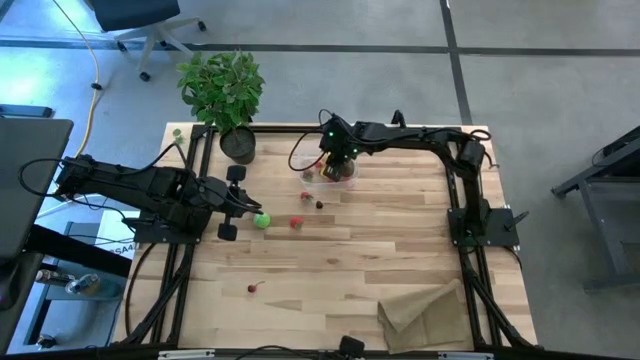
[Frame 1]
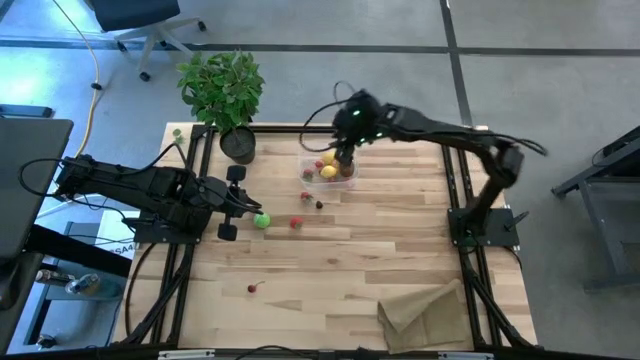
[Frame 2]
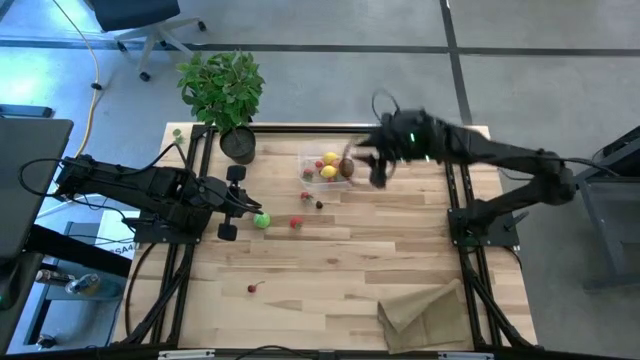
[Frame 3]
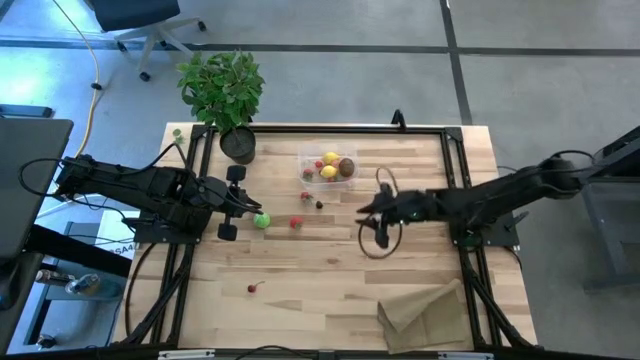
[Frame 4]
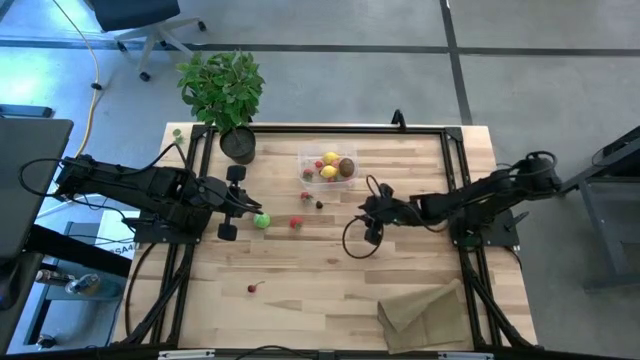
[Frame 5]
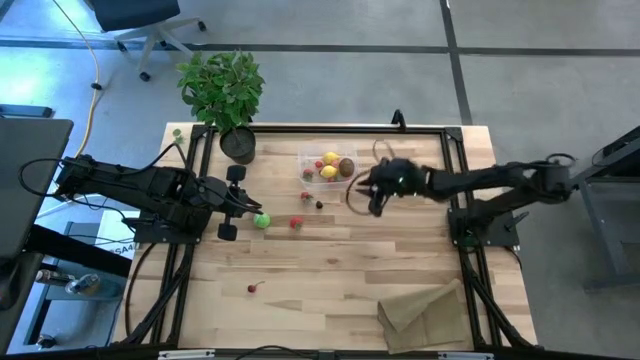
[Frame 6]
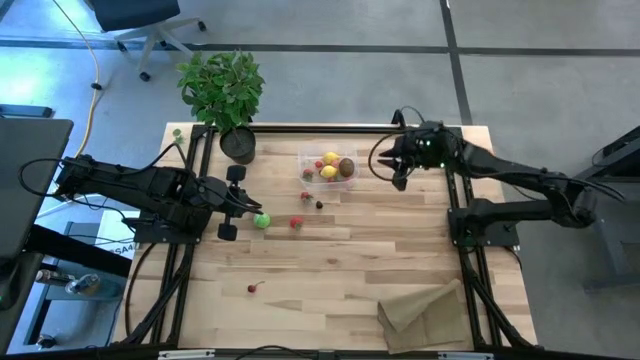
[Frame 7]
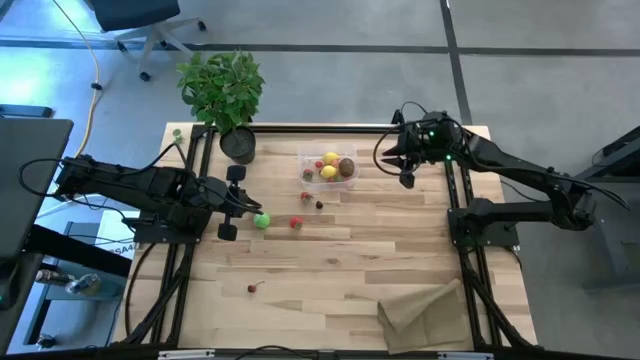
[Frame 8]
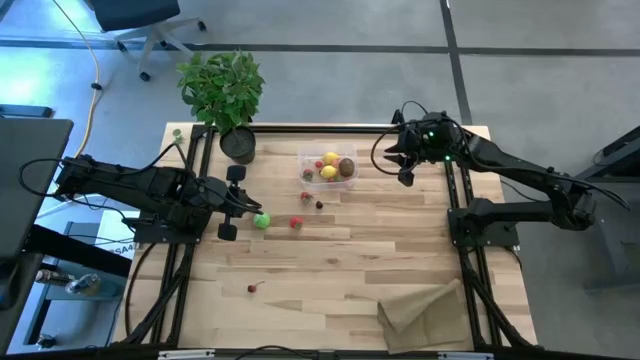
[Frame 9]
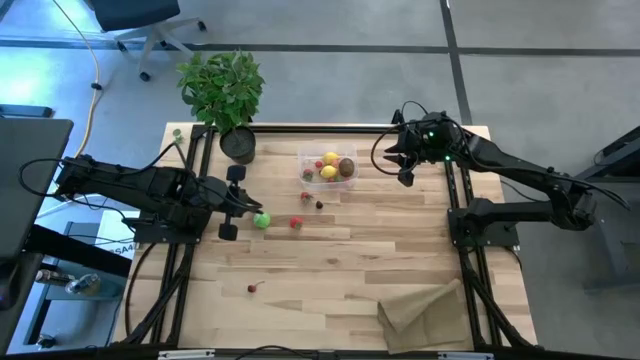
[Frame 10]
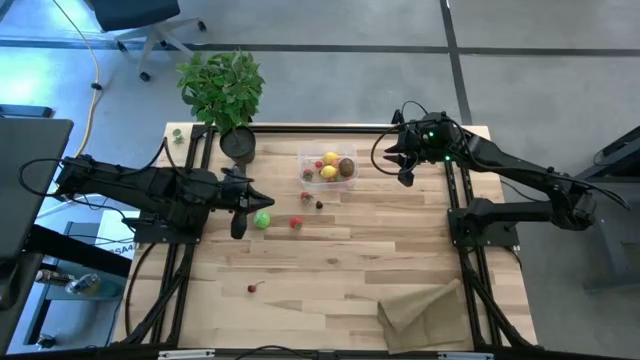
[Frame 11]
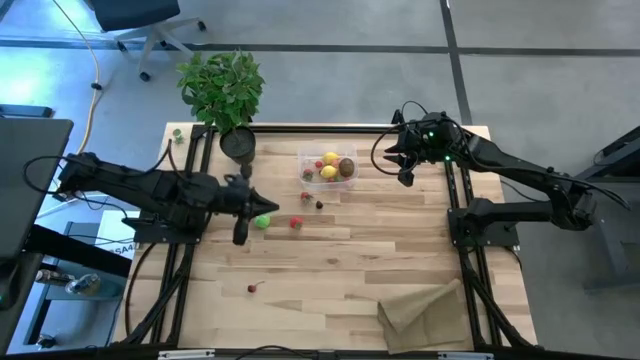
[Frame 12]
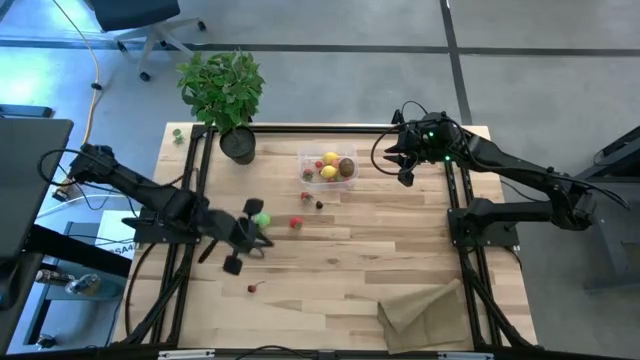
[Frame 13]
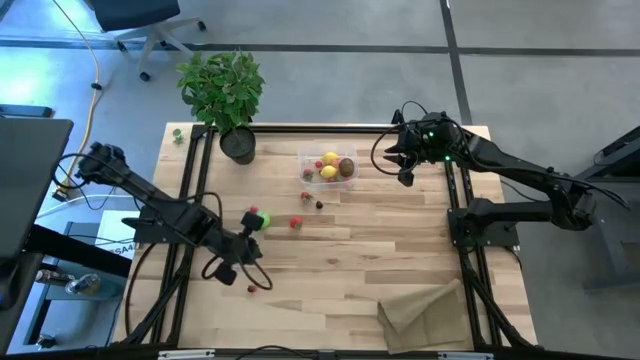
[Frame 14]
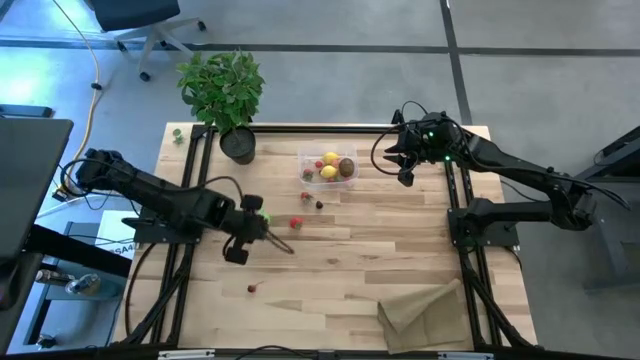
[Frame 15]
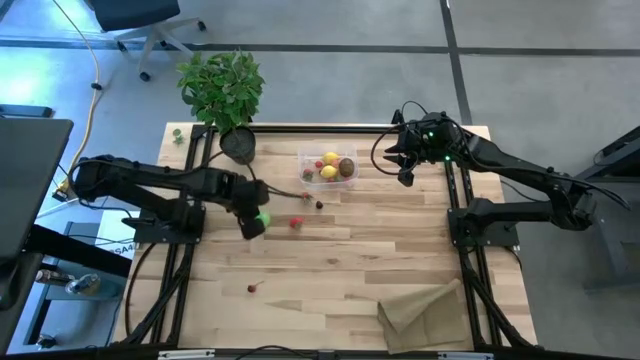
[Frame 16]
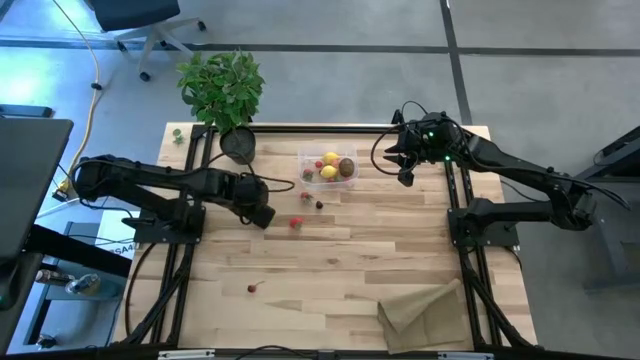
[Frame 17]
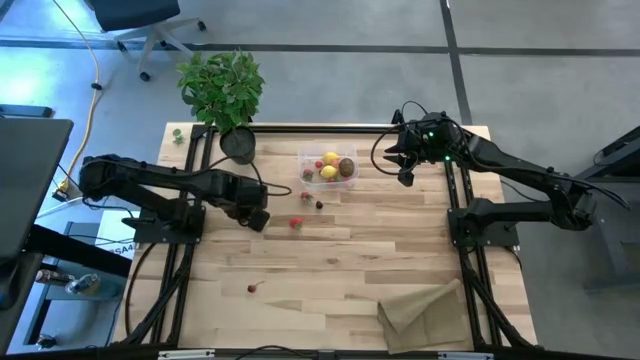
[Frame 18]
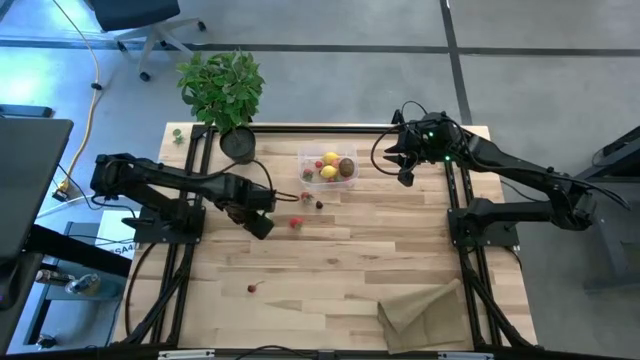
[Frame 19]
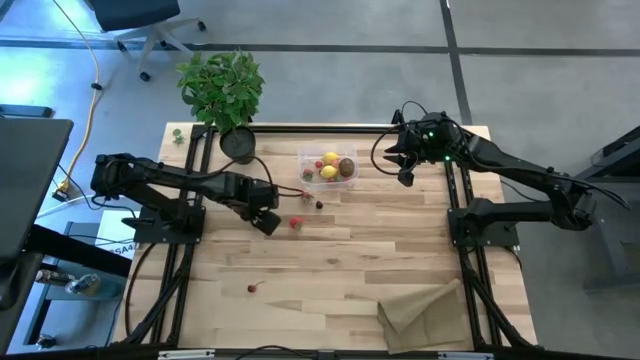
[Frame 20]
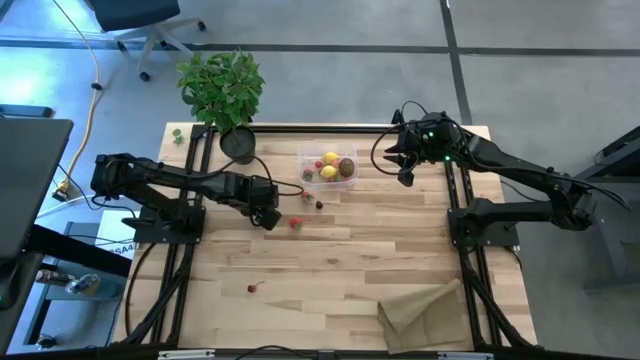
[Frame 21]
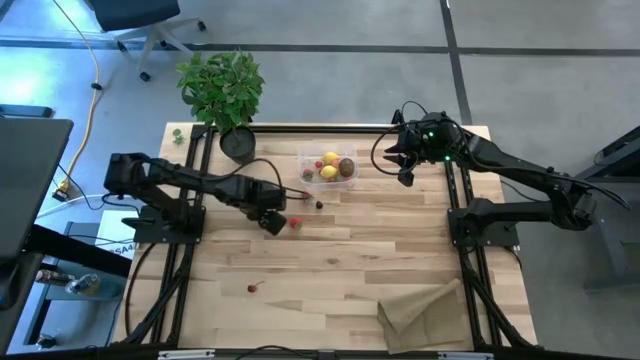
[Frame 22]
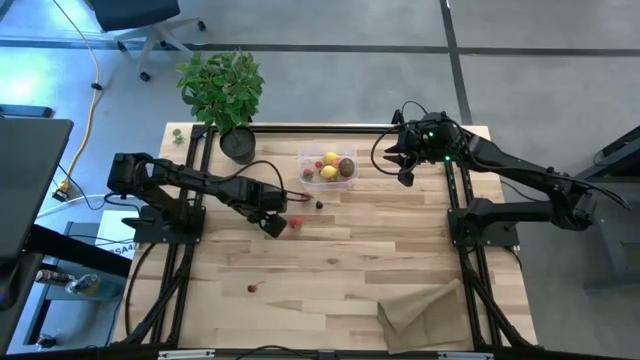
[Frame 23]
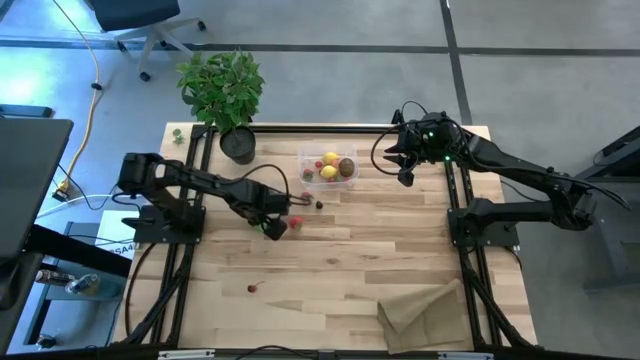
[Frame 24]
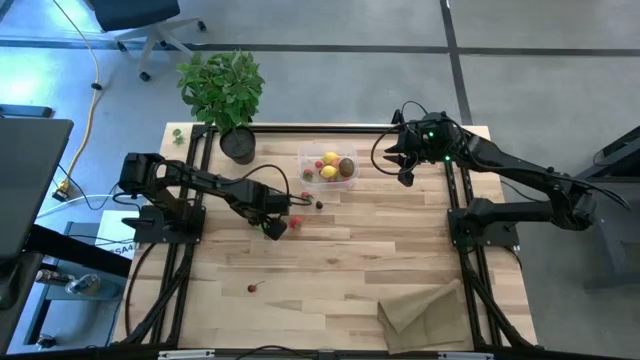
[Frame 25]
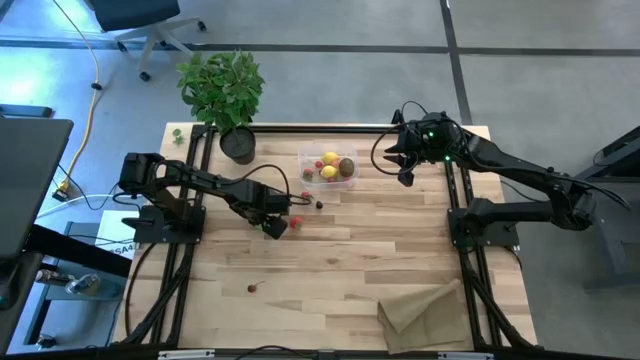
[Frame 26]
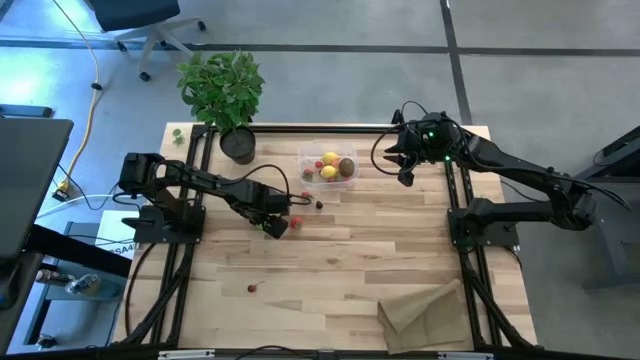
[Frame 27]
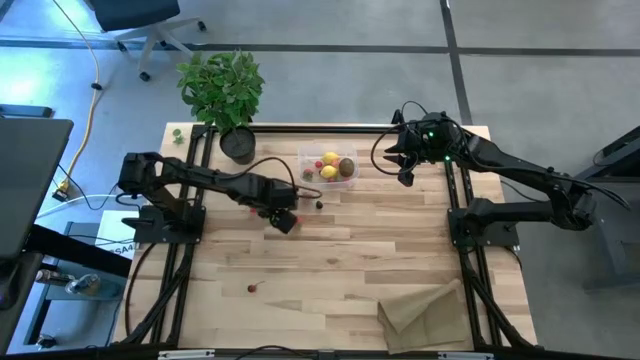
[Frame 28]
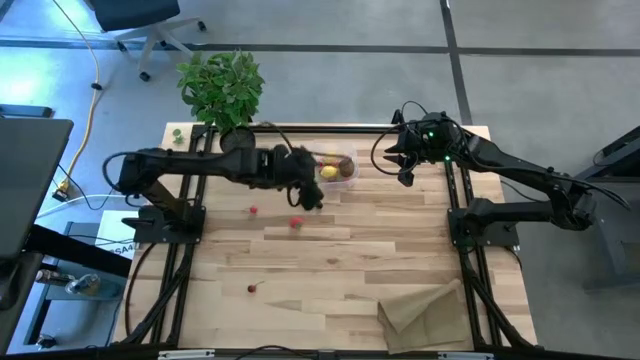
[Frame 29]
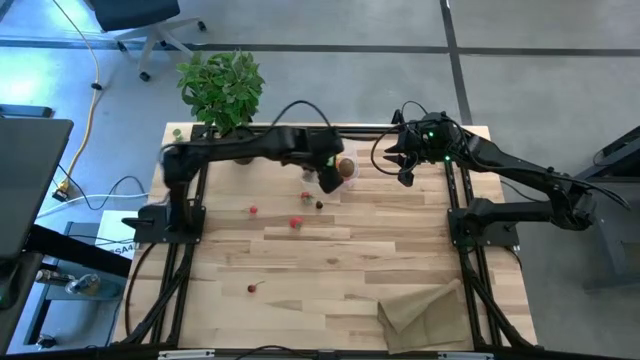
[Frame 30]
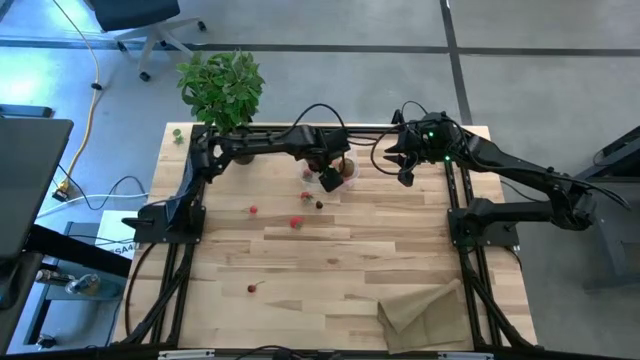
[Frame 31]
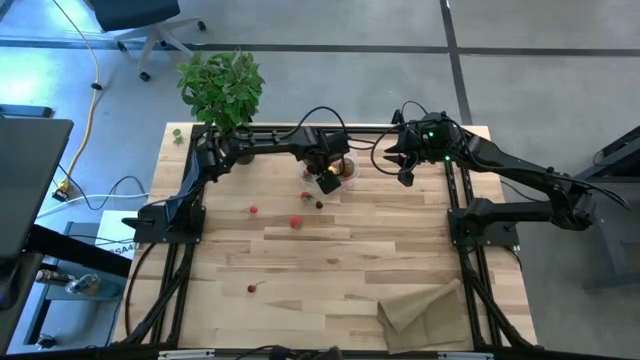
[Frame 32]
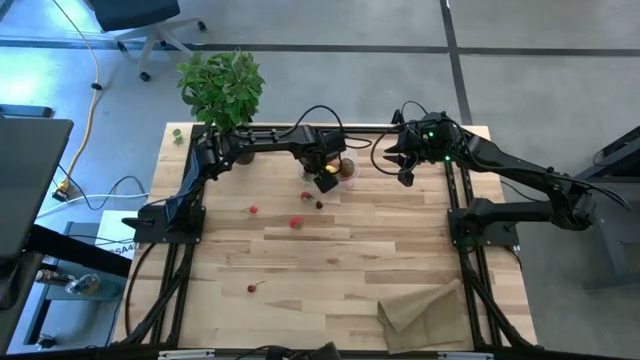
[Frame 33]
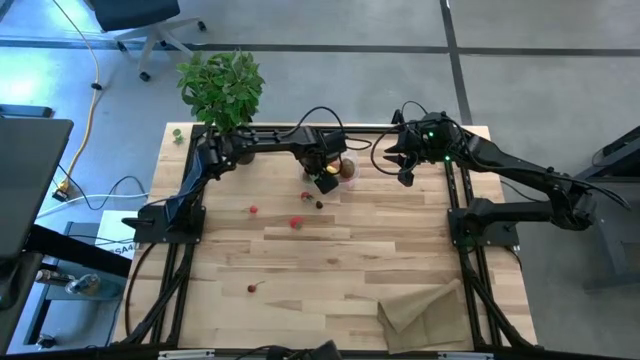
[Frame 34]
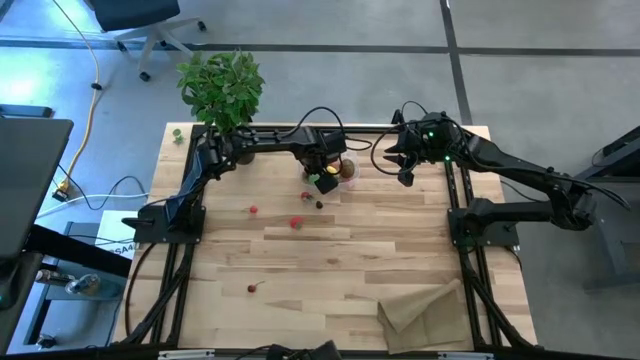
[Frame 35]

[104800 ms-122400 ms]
Task: Pick and placing Produce into tupperware
Put the cabbage into the transparent bin

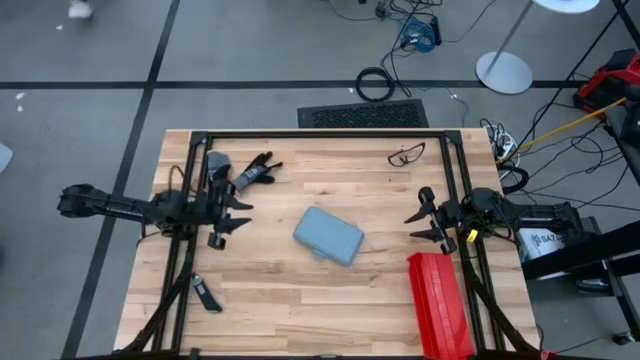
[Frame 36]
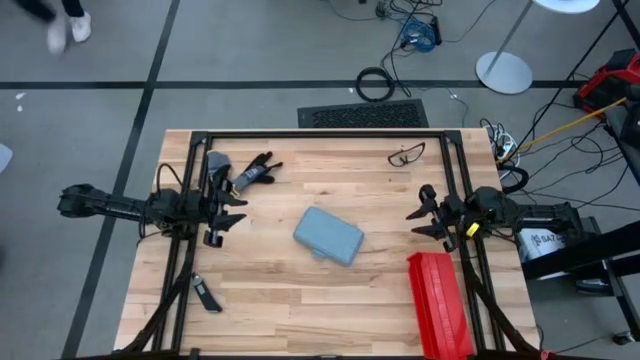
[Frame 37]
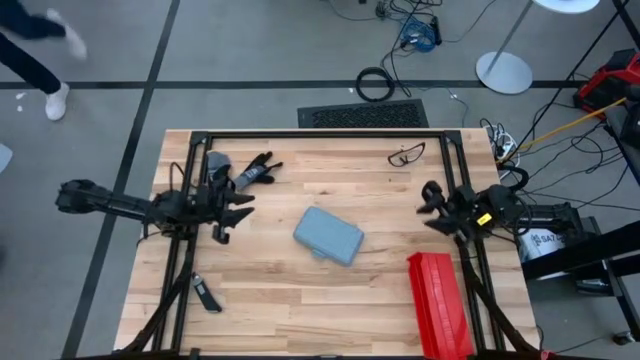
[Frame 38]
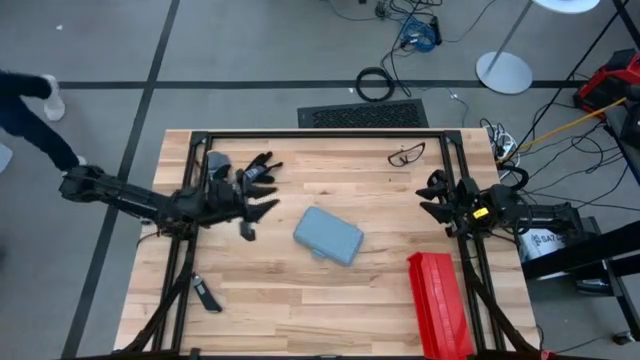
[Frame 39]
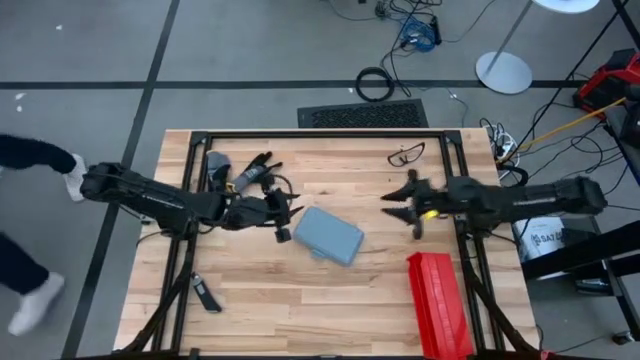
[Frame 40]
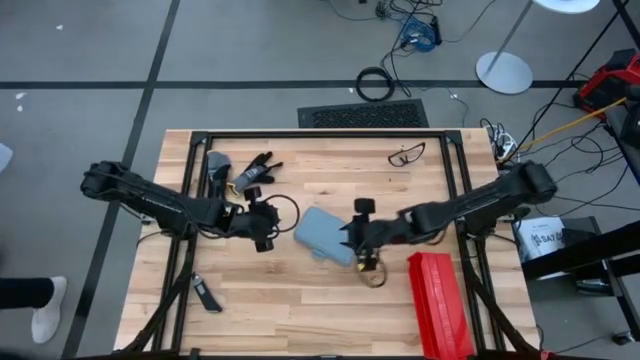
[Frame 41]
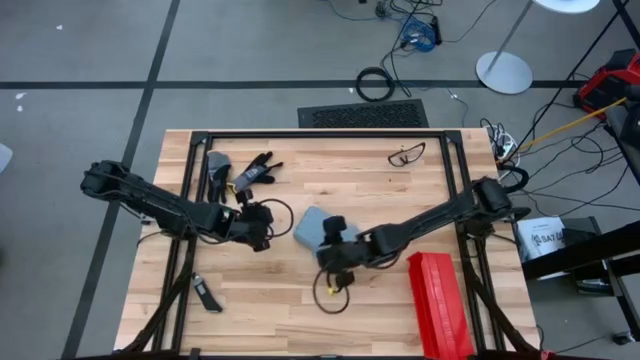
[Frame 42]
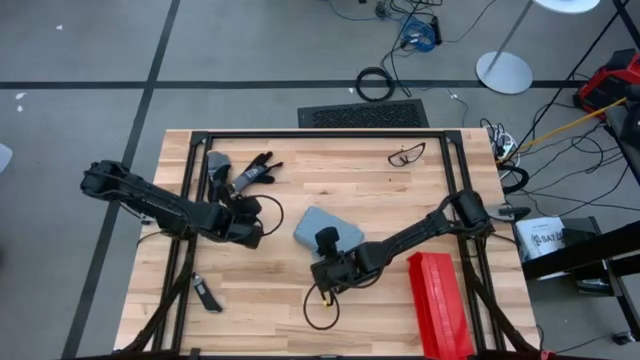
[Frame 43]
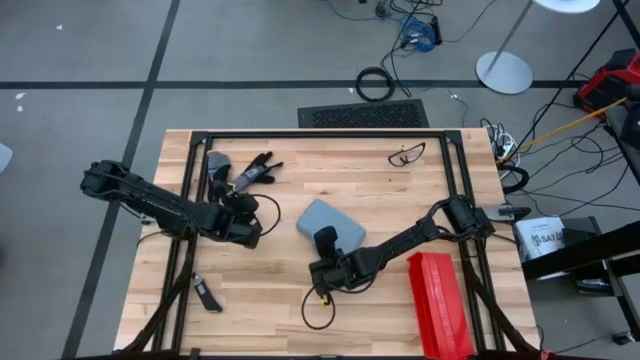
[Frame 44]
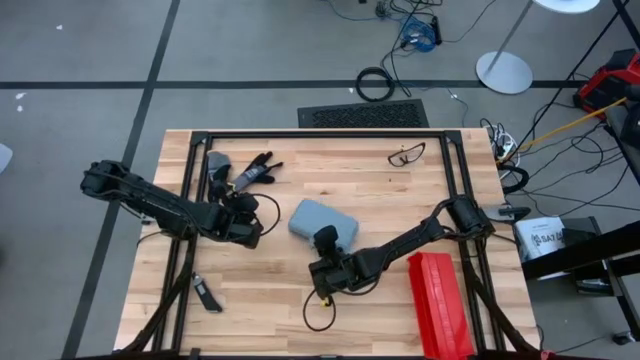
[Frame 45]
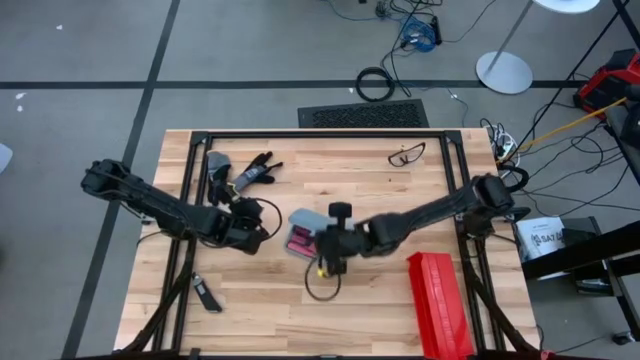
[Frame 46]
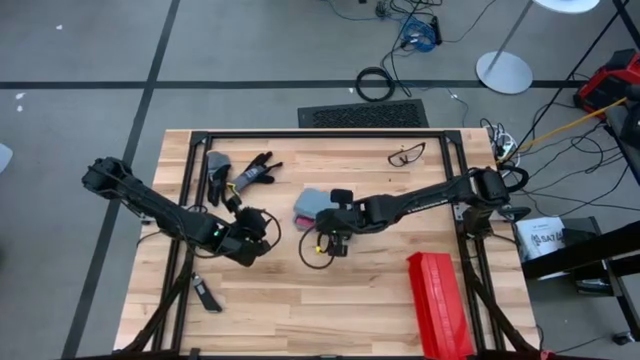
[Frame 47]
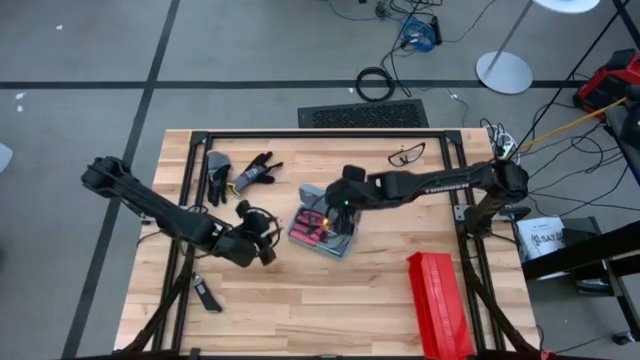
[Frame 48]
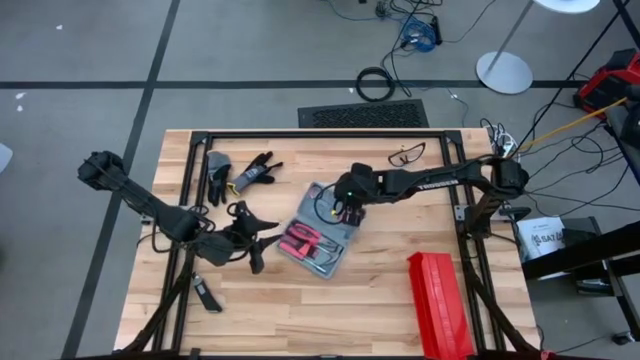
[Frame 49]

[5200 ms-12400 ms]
Task: prefit tool cases
Open the gray prefit tools case
